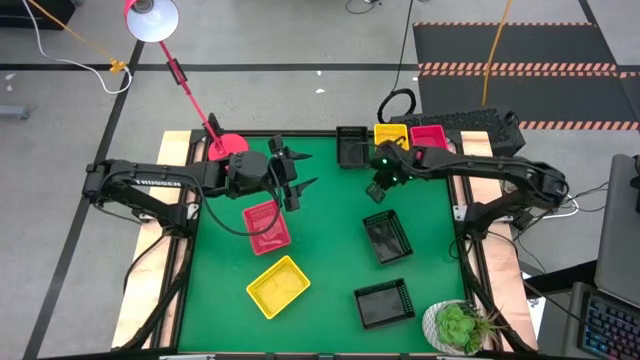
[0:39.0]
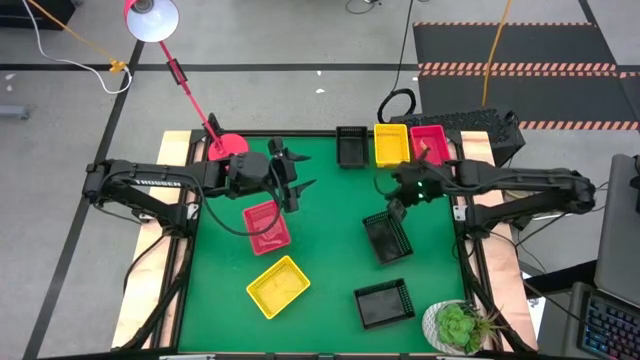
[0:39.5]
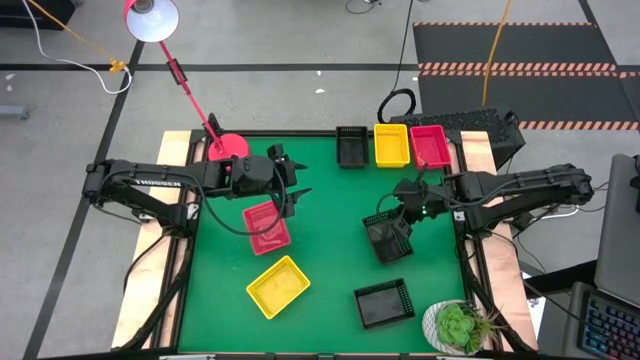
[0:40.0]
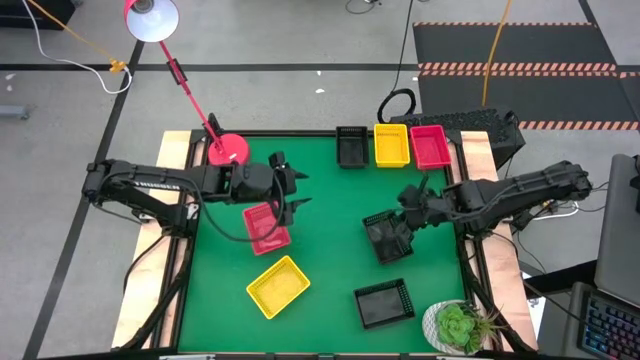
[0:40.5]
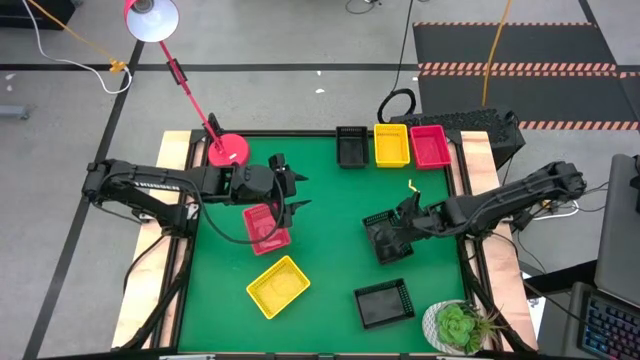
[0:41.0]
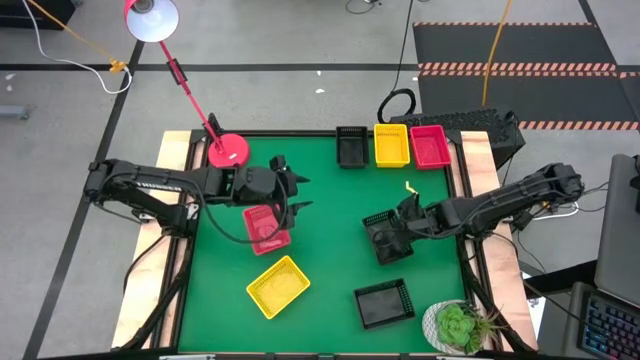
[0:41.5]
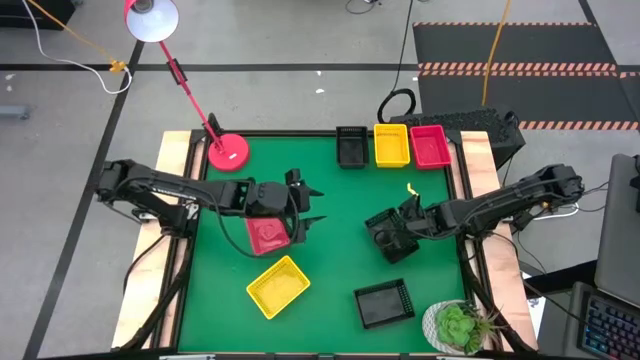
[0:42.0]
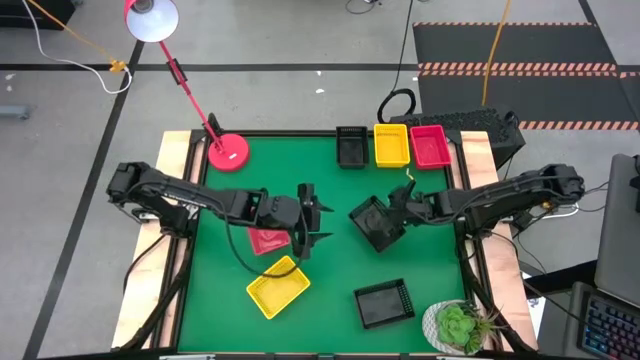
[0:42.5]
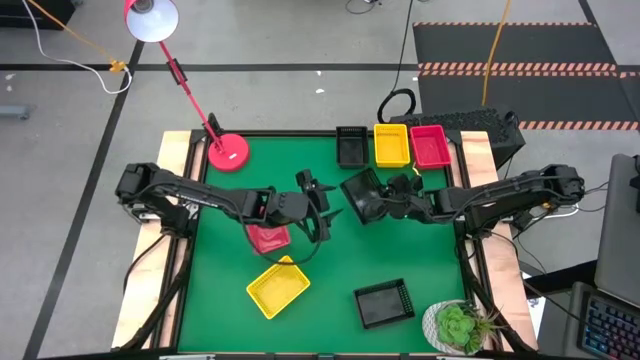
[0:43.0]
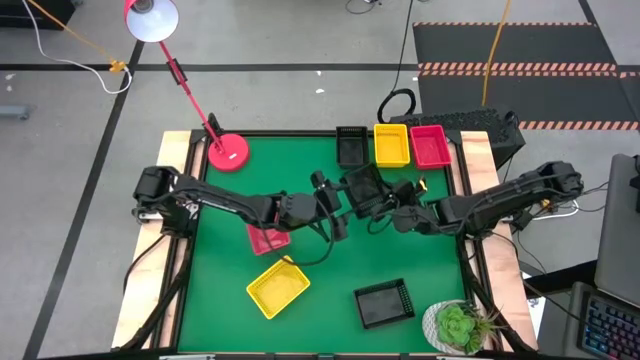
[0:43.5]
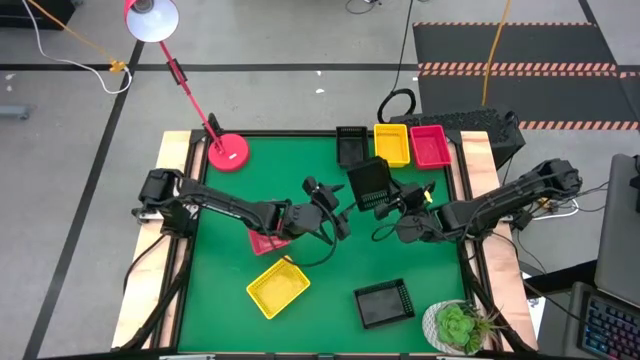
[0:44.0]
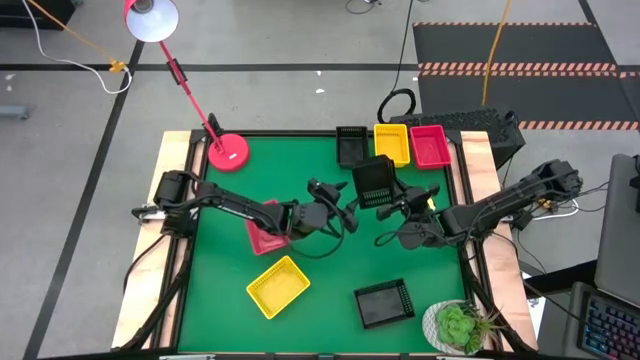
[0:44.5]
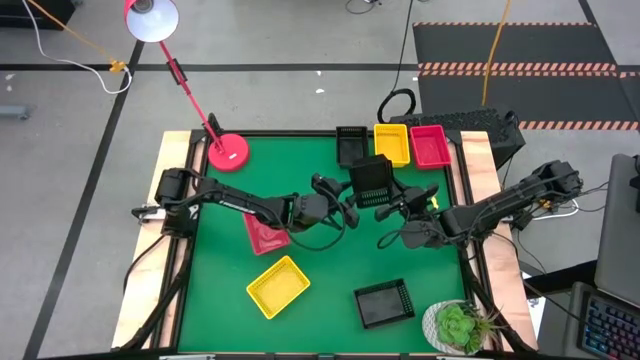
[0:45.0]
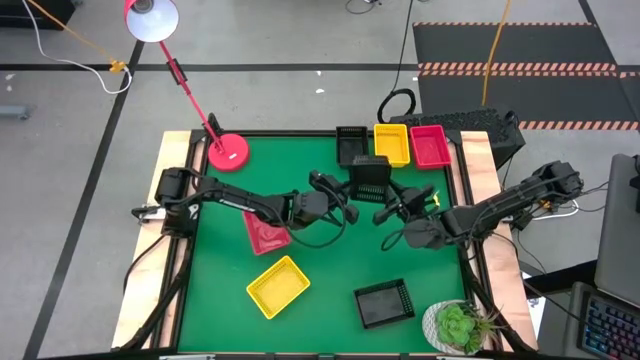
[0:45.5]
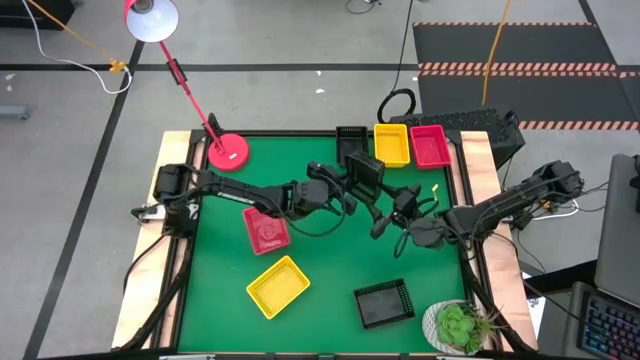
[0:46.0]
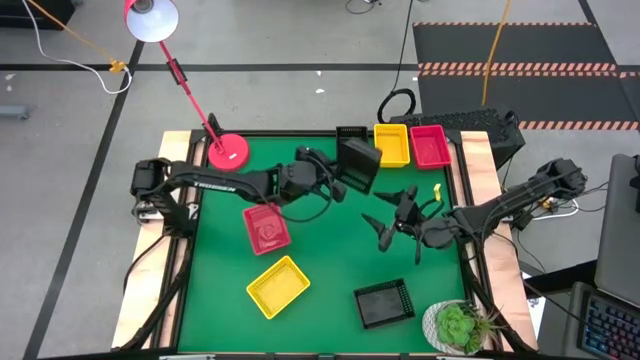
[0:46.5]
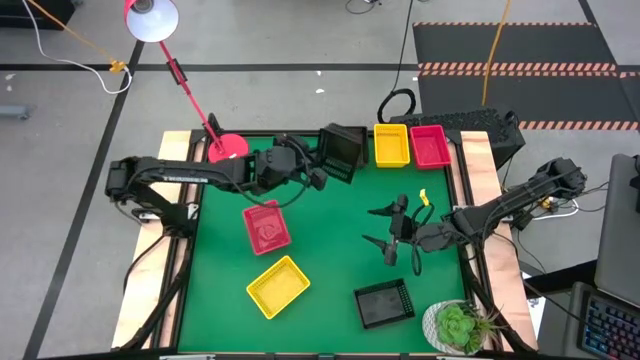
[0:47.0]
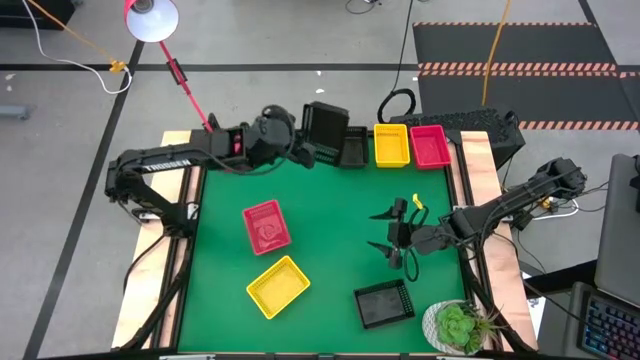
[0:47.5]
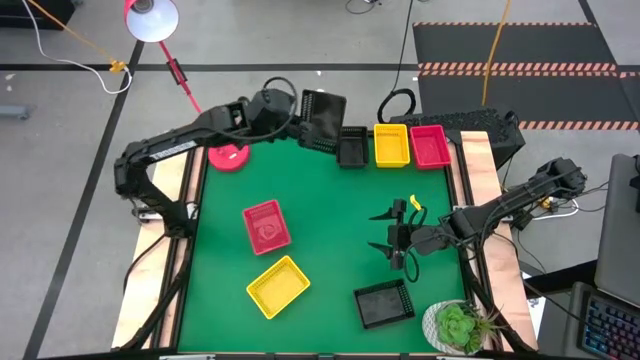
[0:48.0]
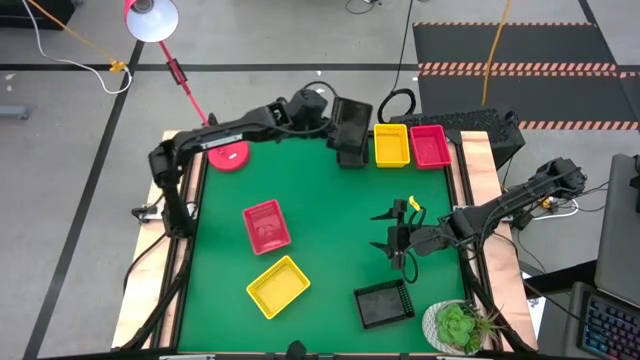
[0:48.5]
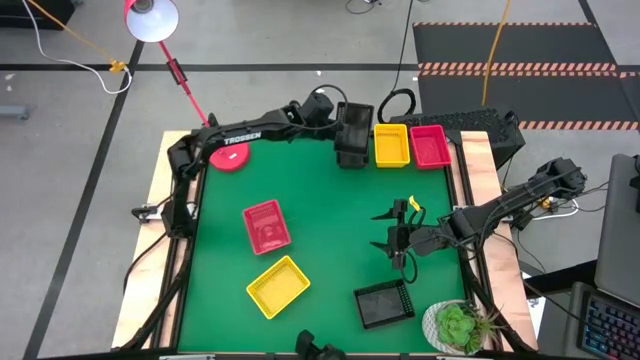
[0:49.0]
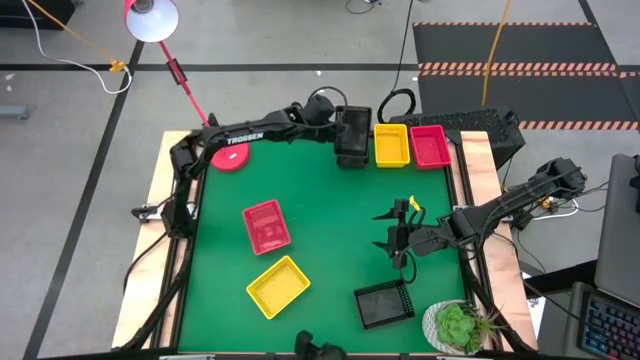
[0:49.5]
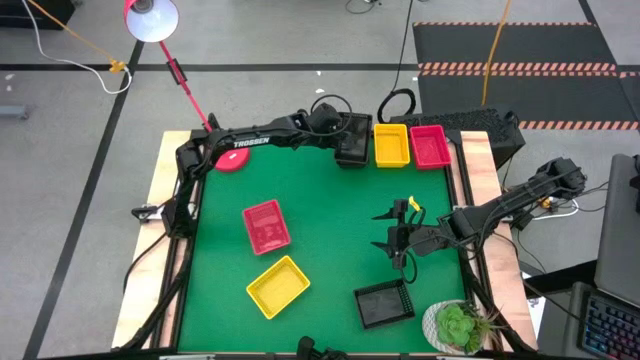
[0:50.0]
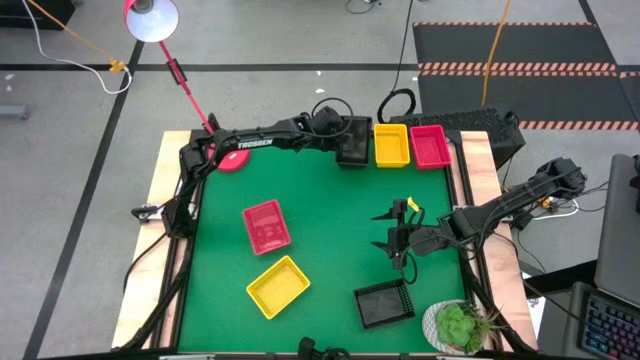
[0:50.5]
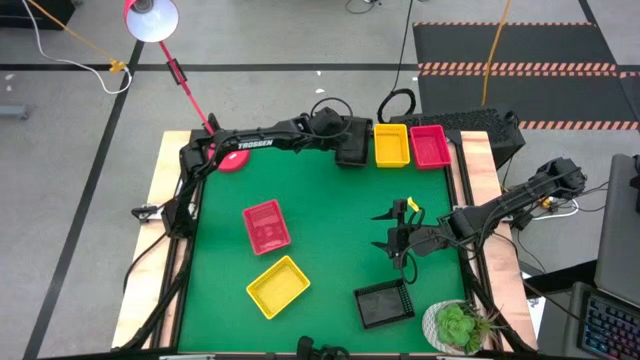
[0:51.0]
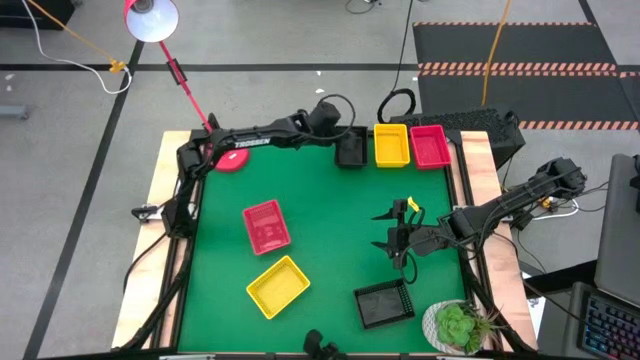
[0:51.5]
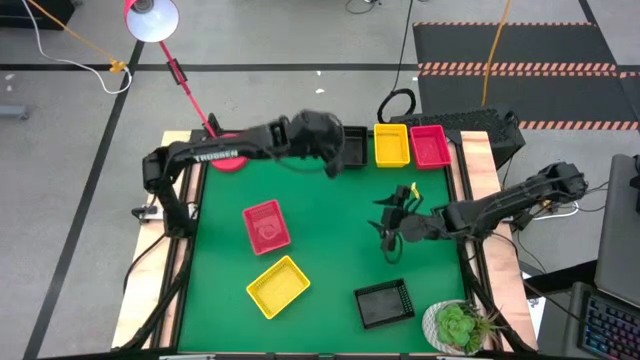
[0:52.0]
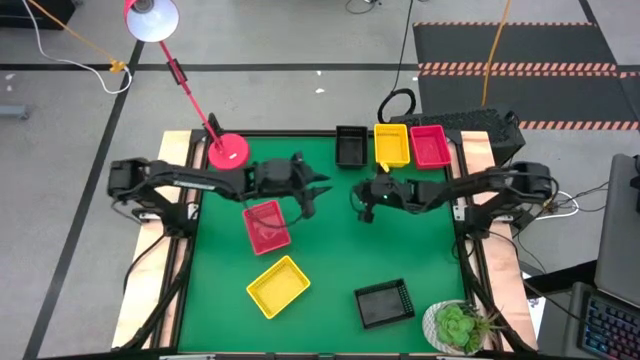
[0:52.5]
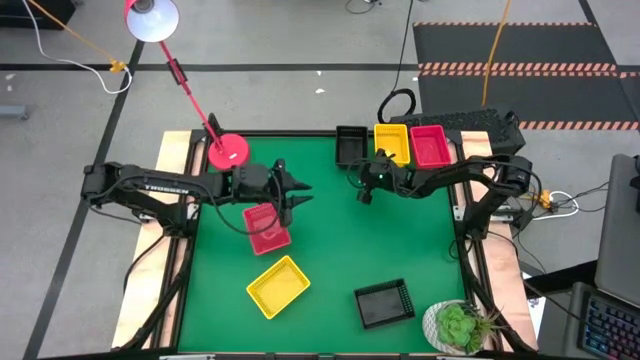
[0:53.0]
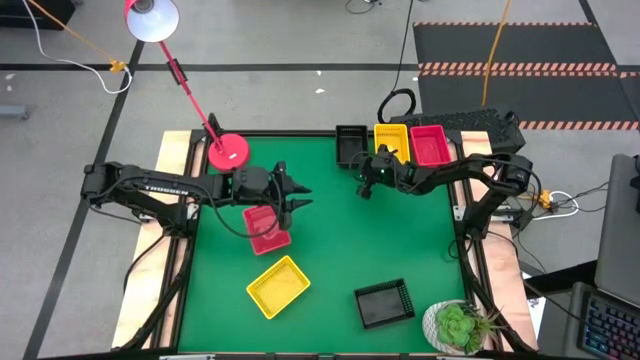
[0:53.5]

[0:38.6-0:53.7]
Stack the middle black bin on the top black bin

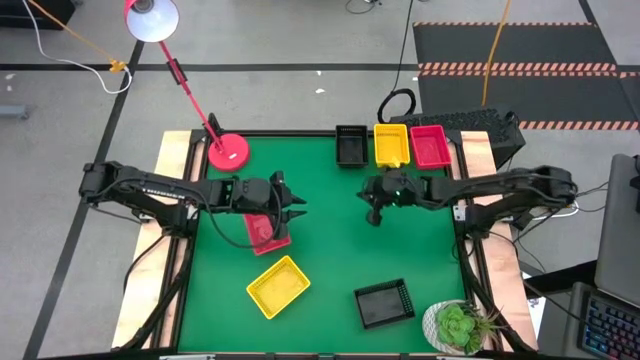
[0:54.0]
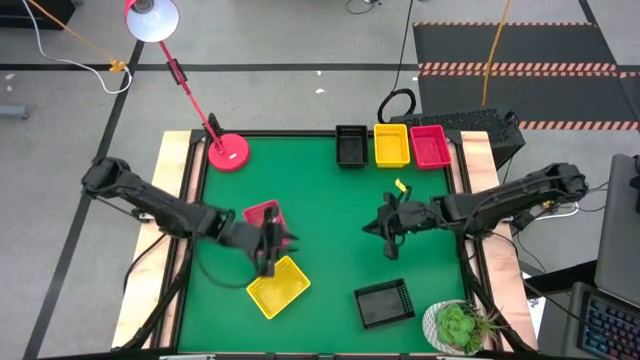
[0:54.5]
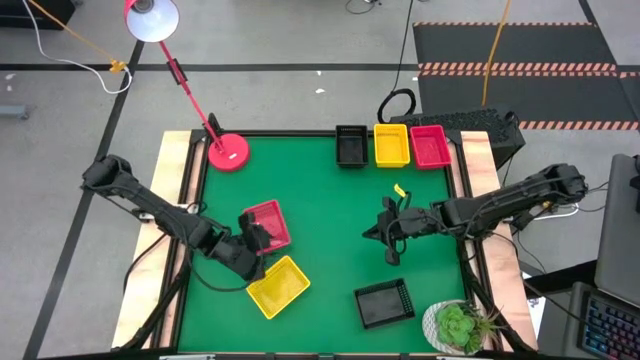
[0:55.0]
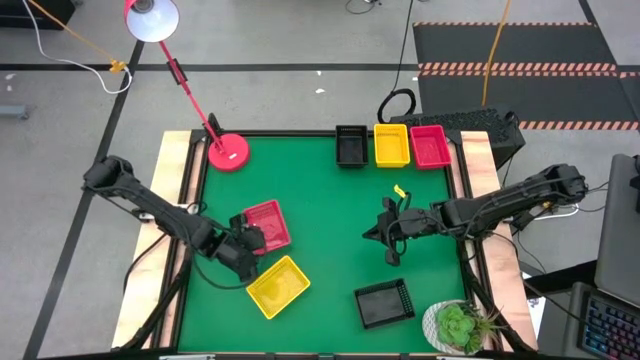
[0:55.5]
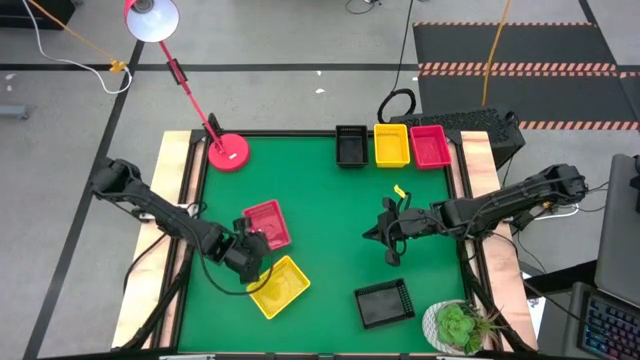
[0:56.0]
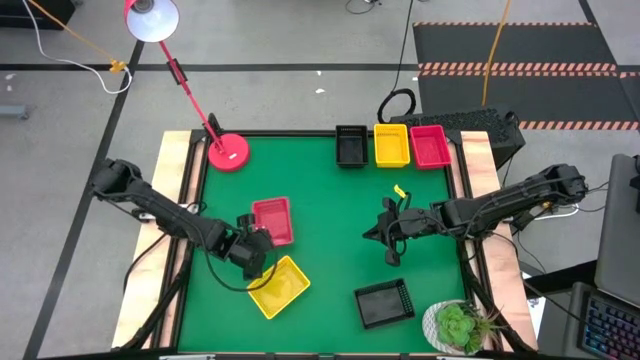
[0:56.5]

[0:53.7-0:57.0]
Stack the left red bin on the right stacked red bins
